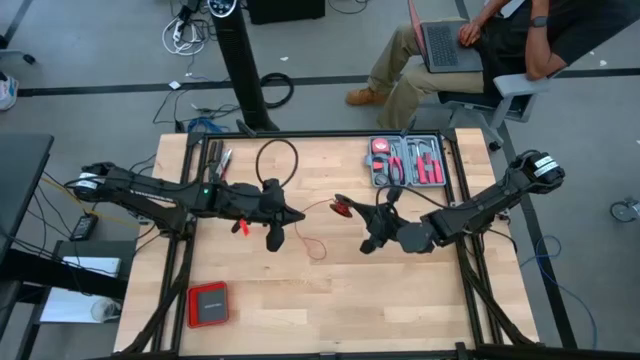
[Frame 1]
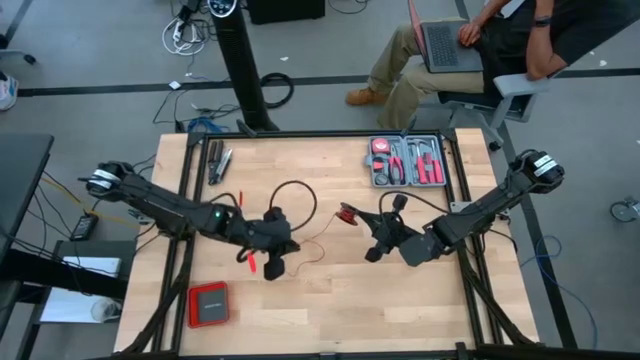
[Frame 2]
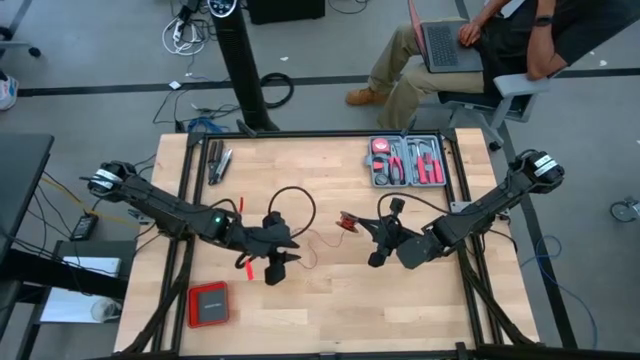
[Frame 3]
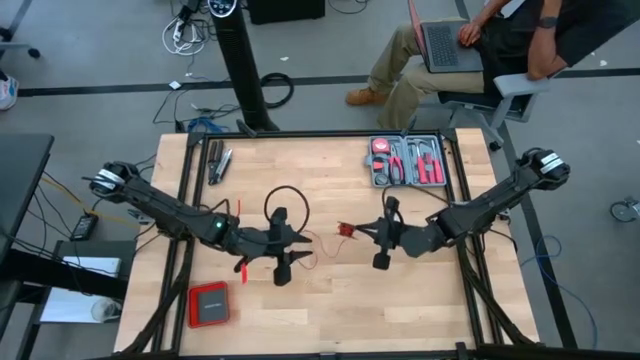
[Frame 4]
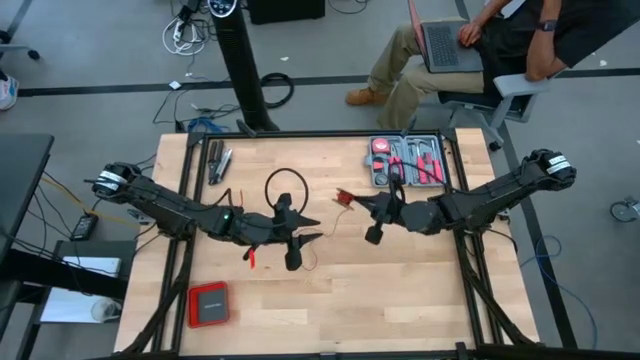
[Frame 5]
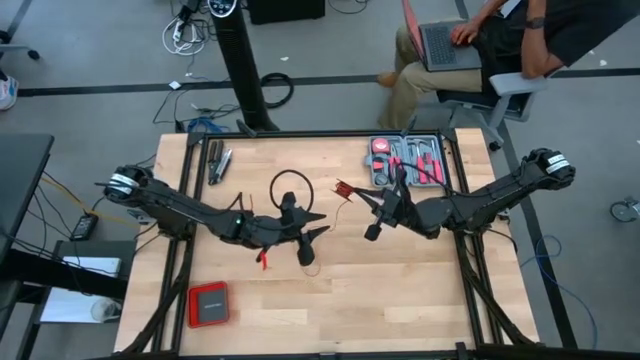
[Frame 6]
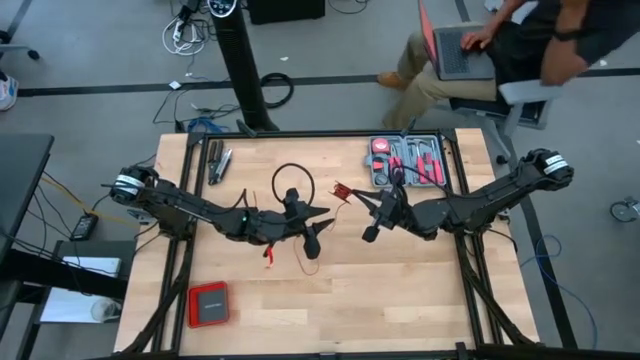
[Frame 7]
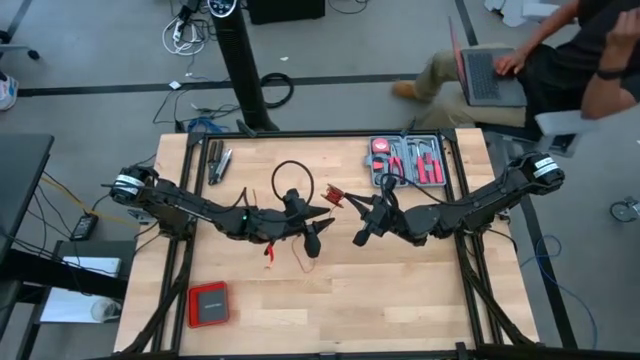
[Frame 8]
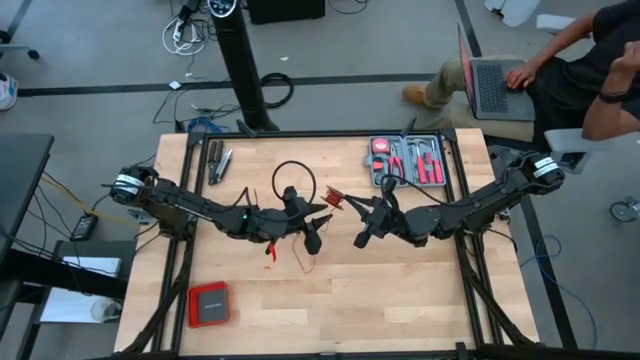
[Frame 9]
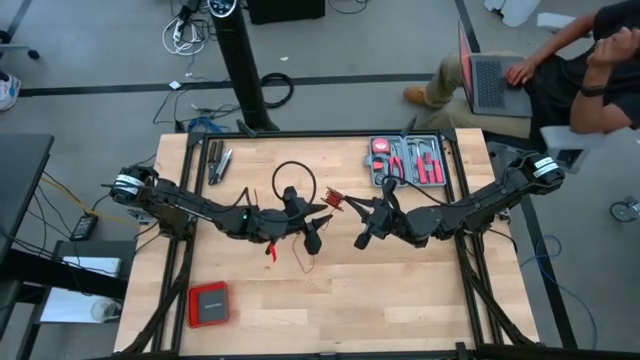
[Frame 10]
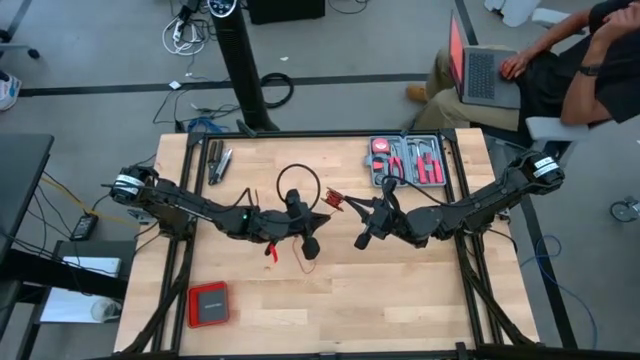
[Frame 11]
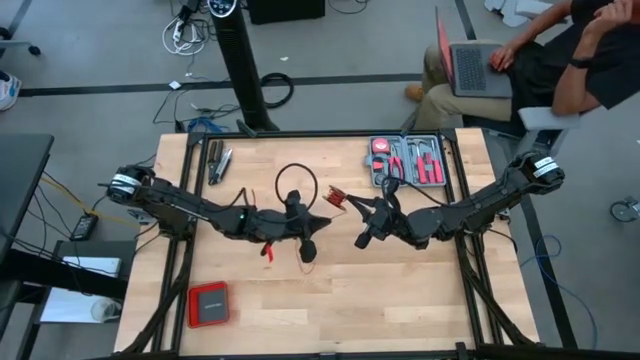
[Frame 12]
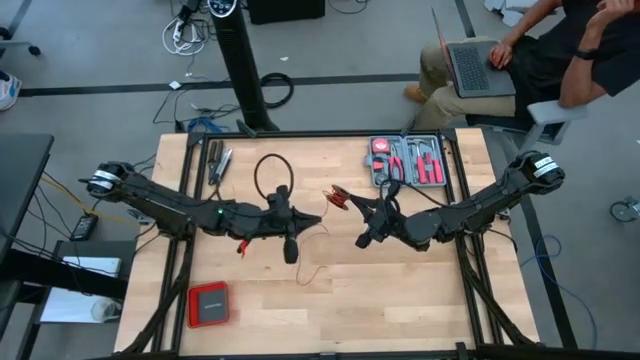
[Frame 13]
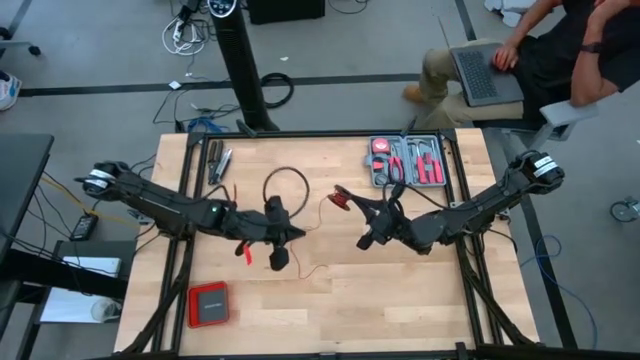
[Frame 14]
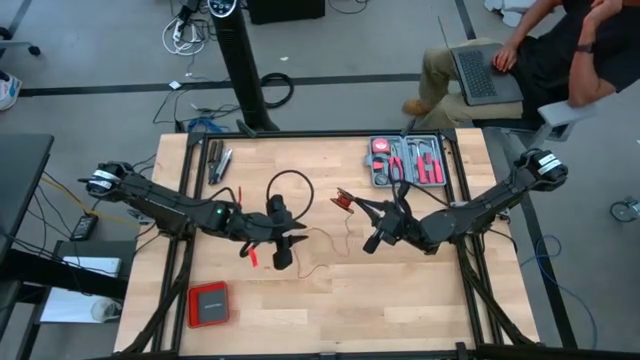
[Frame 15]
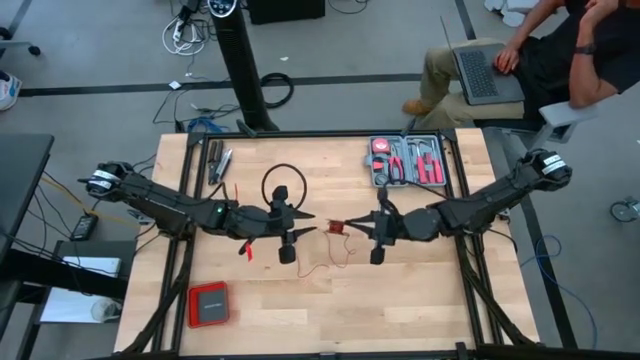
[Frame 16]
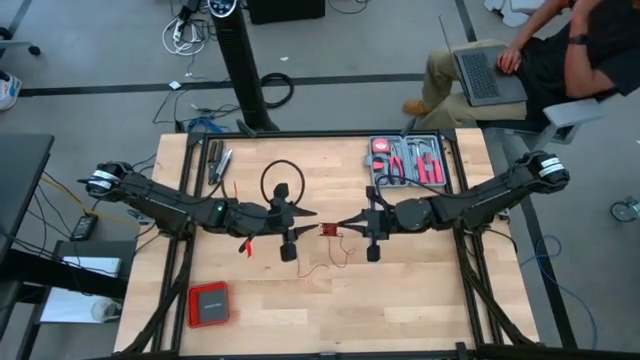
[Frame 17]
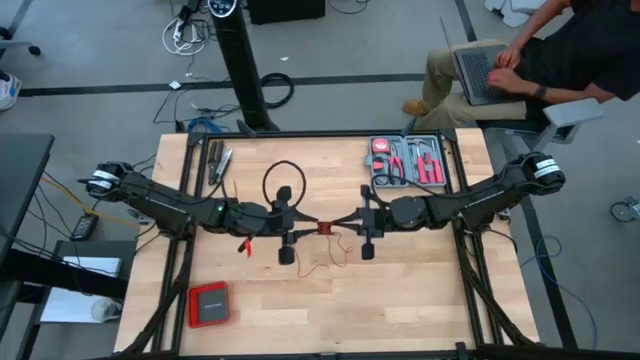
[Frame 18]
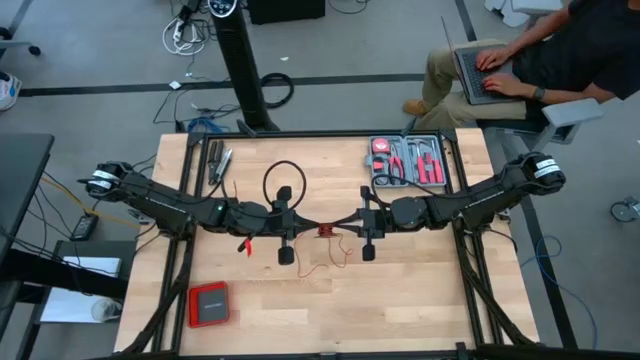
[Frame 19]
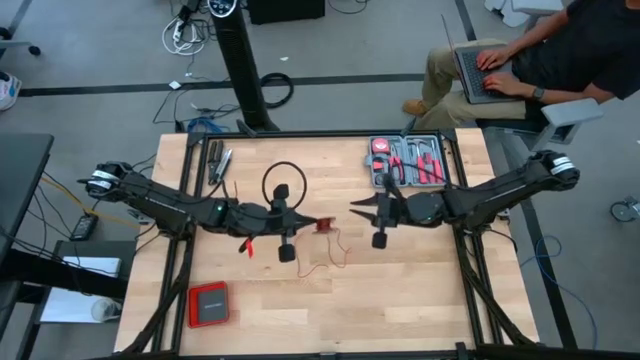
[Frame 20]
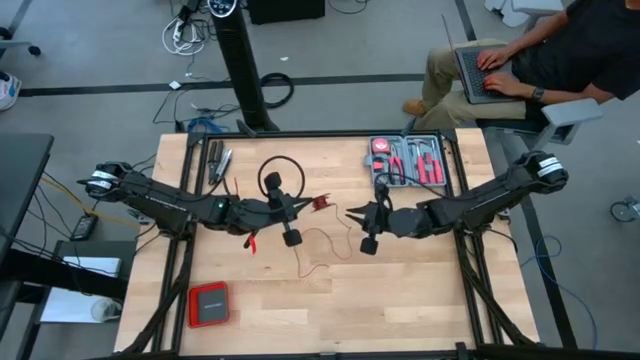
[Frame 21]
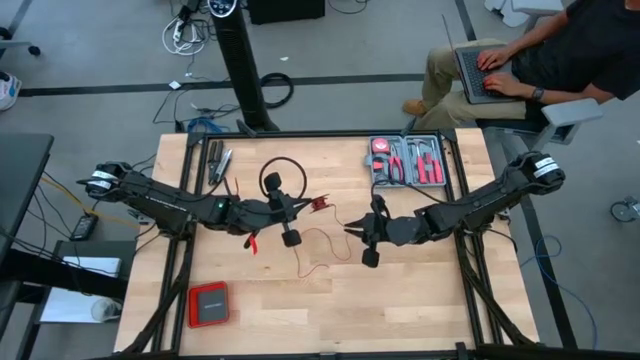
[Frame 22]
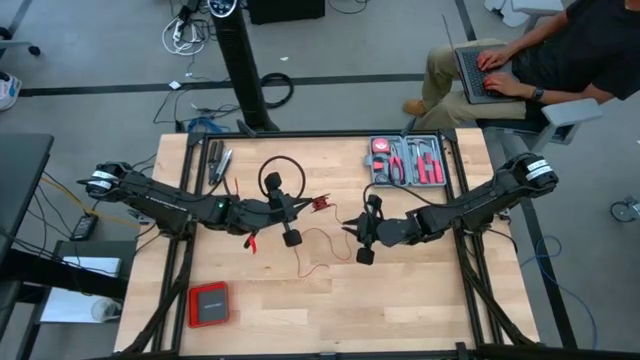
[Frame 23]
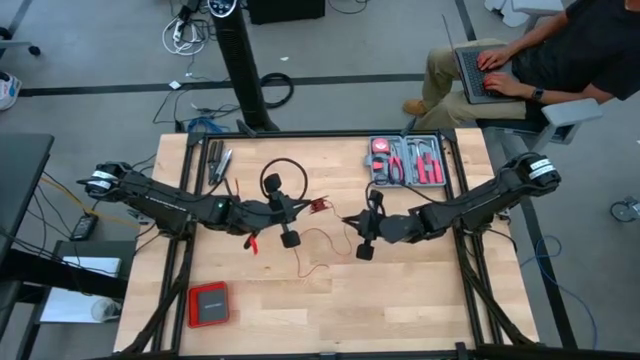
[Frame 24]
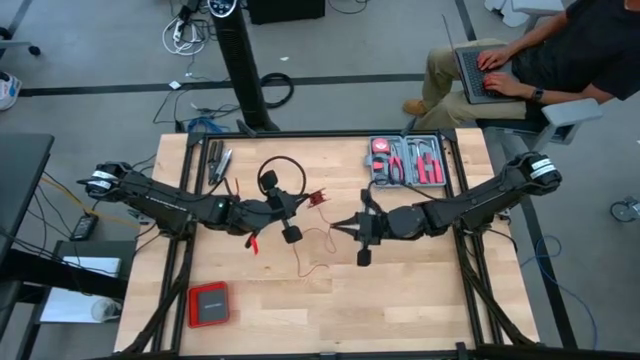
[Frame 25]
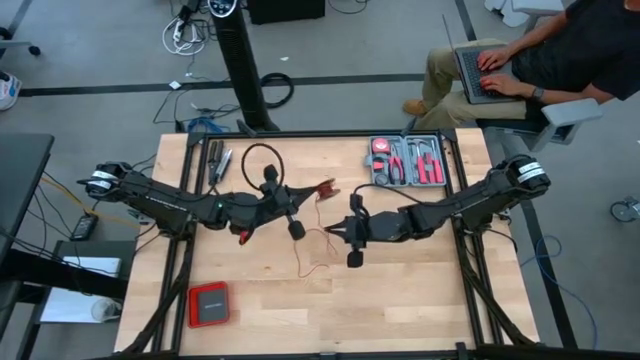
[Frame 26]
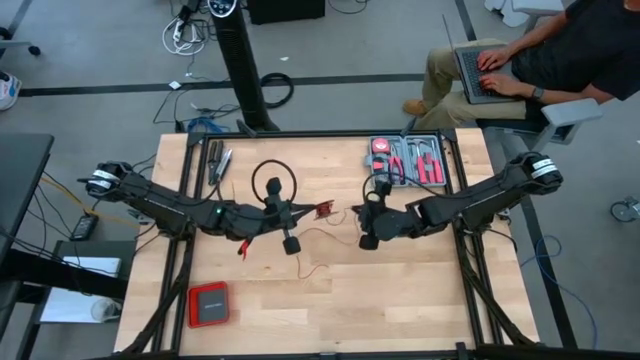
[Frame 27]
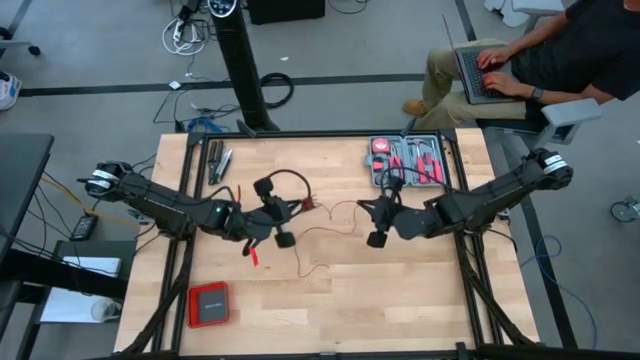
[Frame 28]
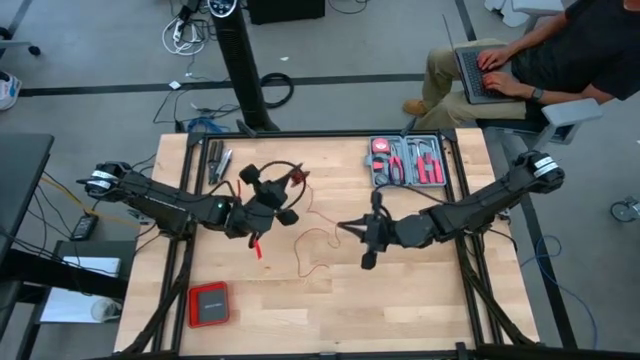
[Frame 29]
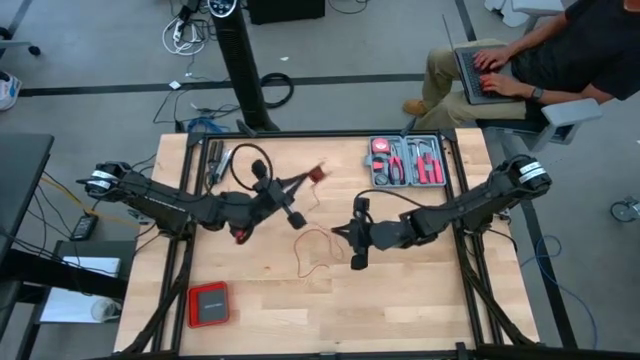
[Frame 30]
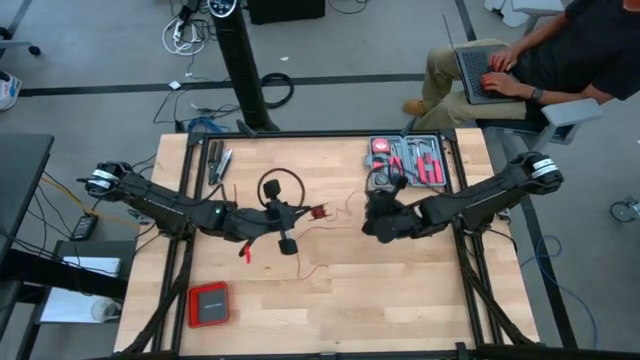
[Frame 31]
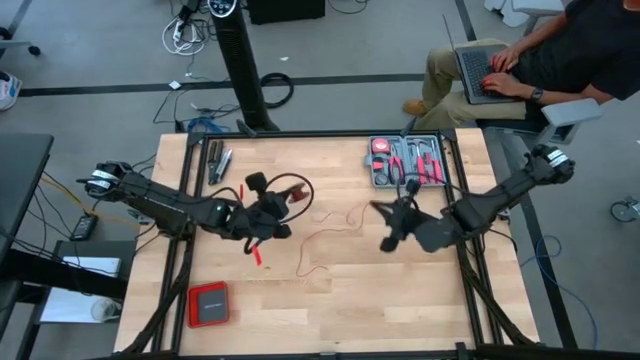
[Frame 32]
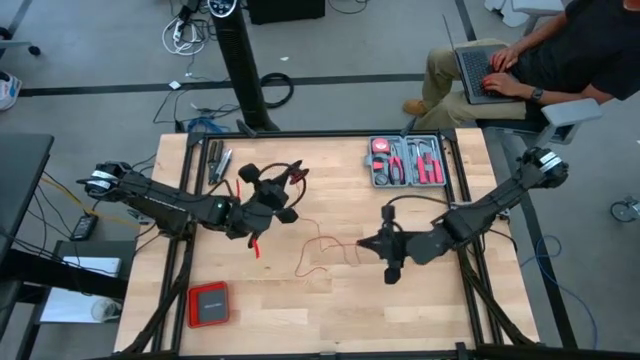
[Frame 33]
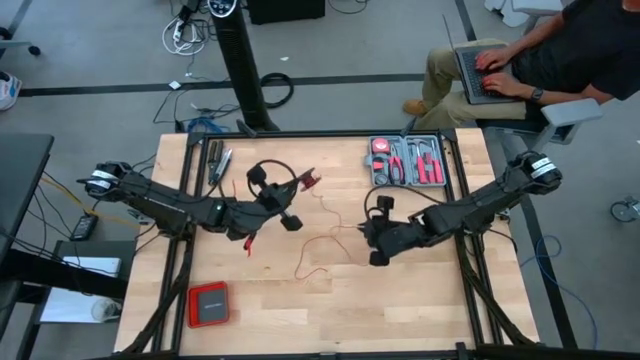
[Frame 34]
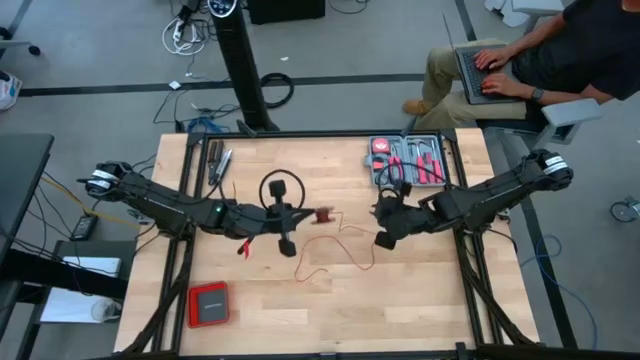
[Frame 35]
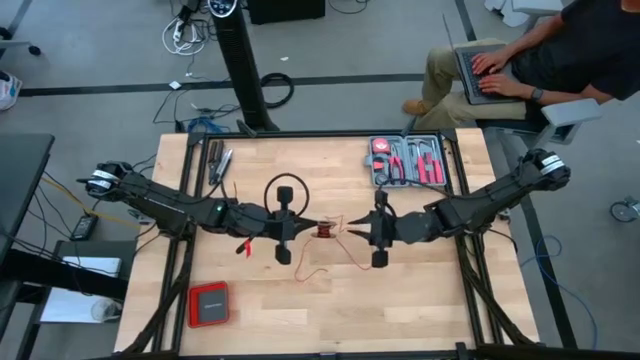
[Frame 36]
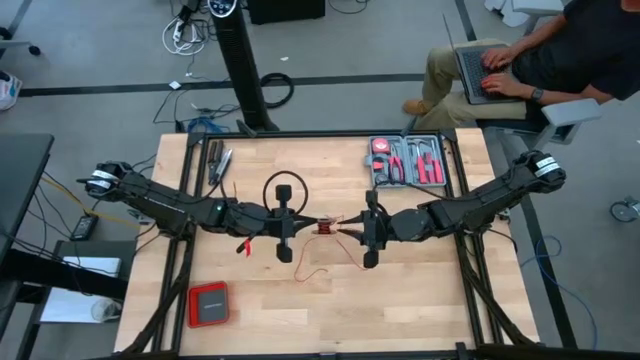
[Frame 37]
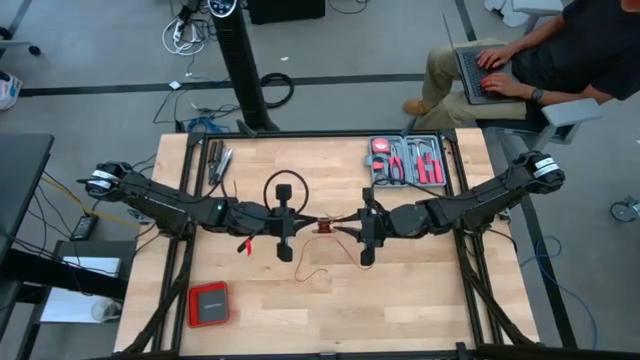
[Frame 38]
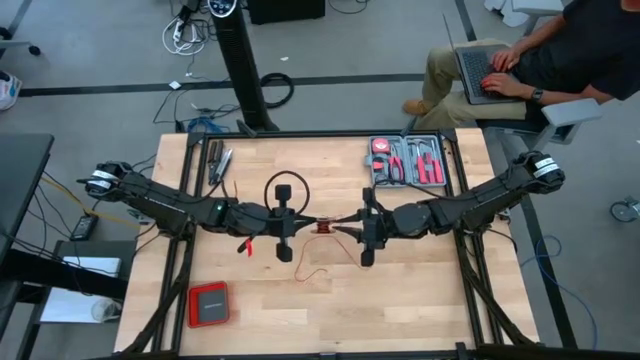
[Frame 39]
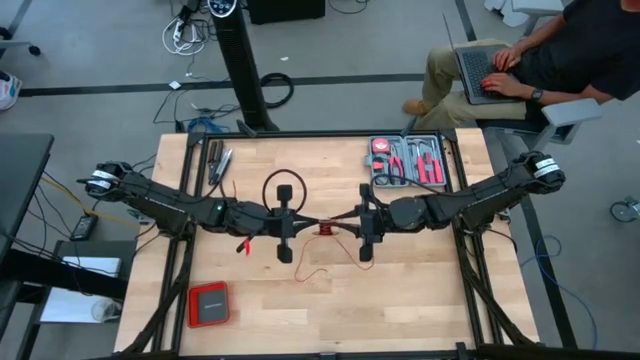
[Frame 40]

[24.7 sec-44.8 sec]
Task: Coil cords
Uncoil the red cable wire from the black spool

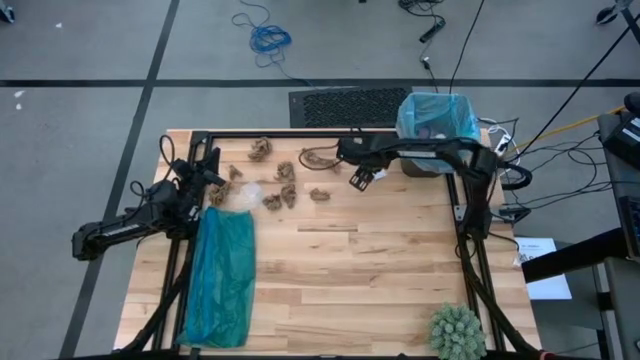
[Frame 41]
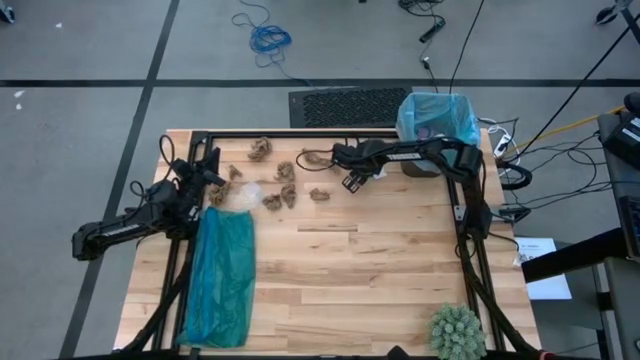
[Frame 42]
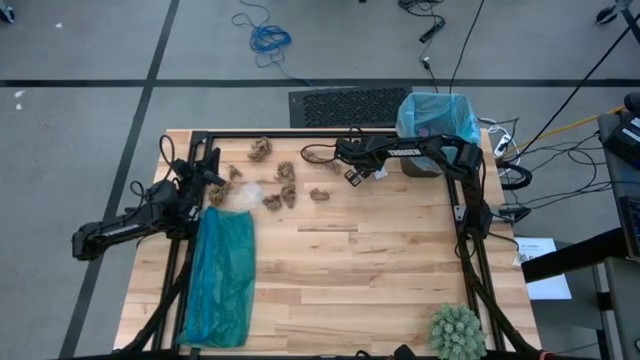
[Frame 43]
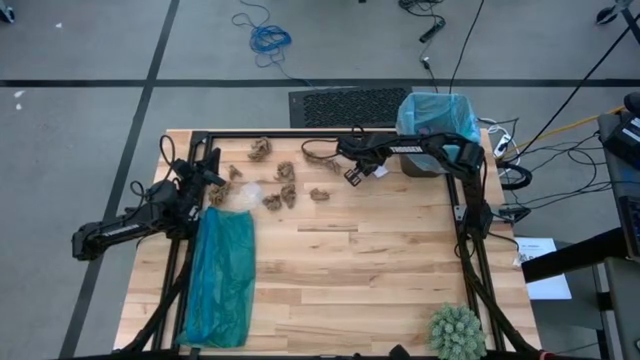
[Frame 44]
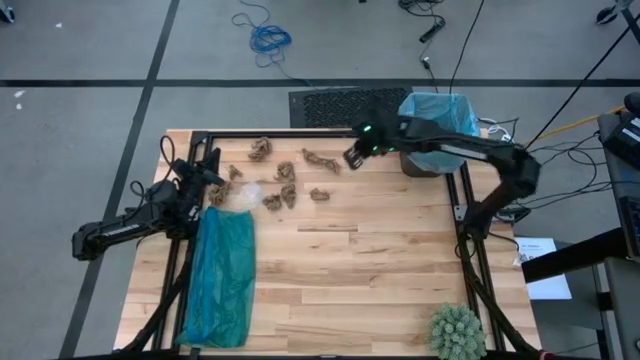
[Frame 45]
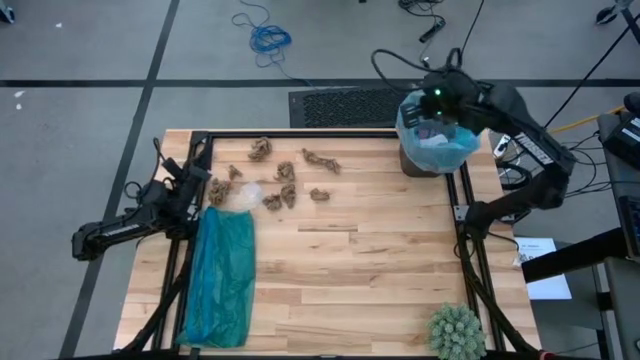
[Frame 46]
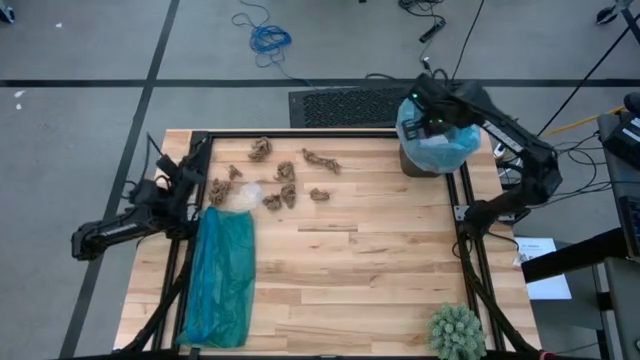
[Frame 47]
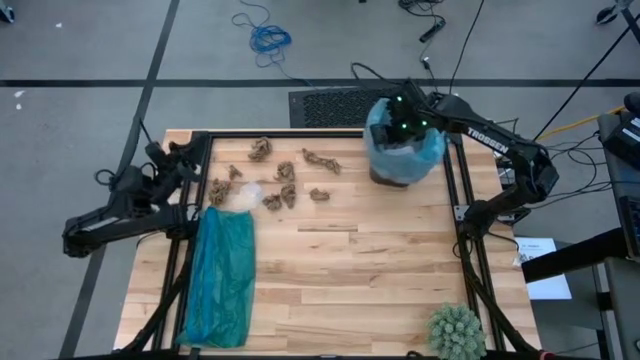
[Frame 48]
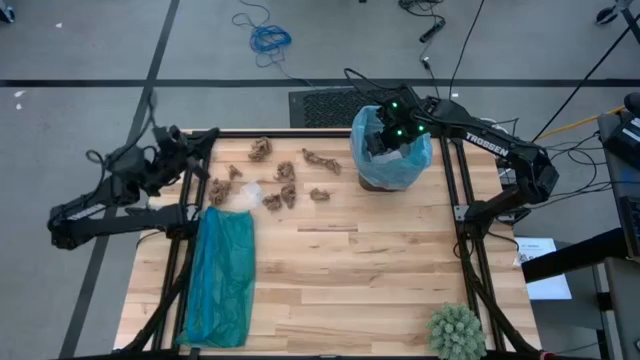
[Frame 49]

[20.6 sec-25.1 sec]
Task: place trash/remove bag and relplace
Put the white paper into the trash bin
